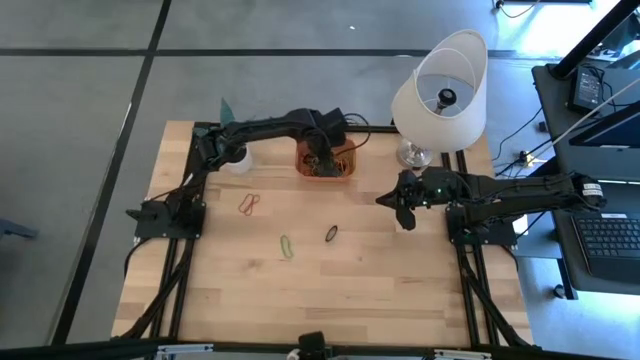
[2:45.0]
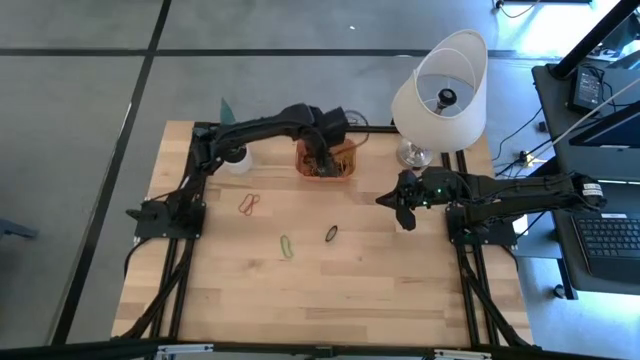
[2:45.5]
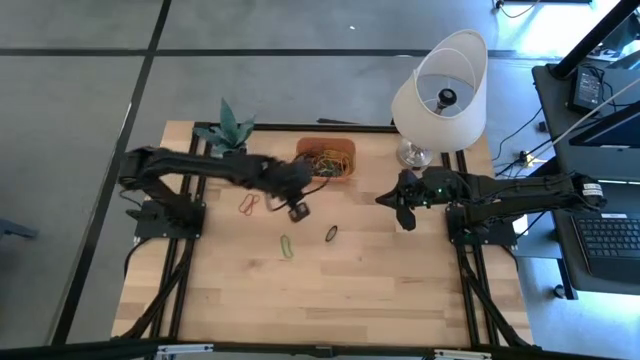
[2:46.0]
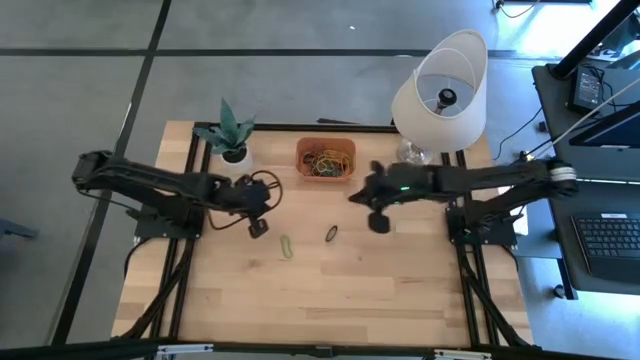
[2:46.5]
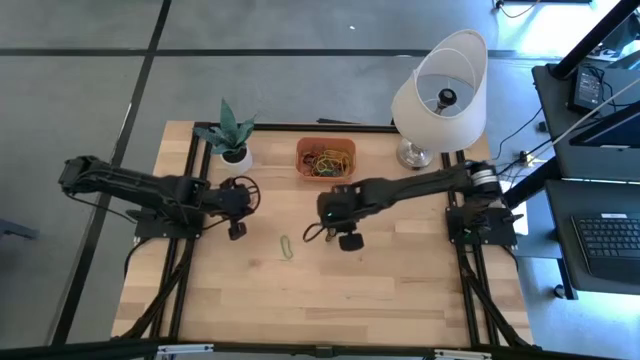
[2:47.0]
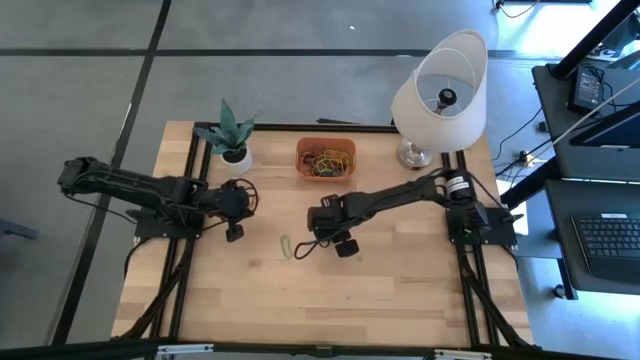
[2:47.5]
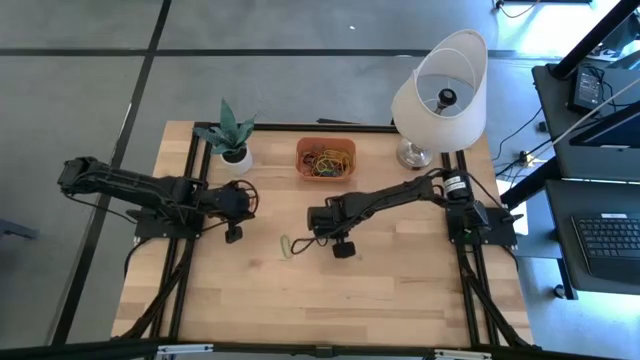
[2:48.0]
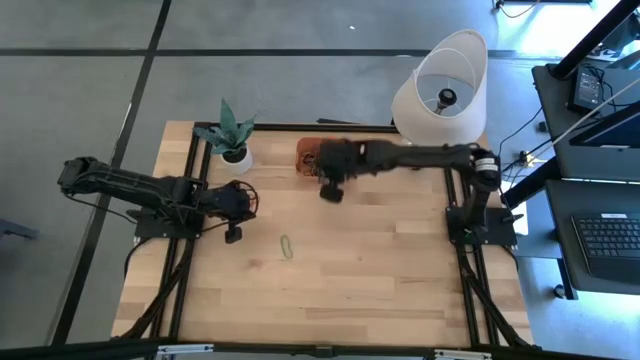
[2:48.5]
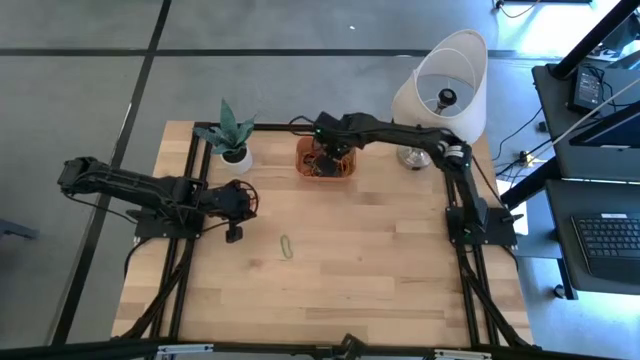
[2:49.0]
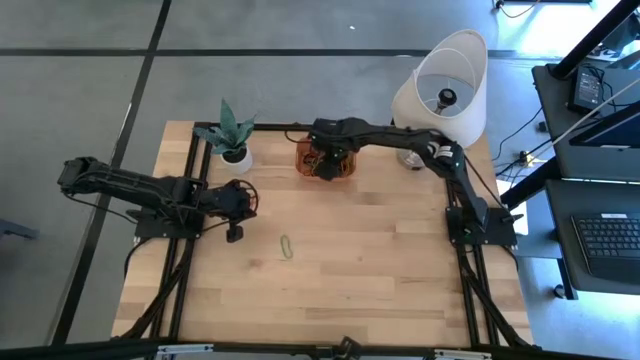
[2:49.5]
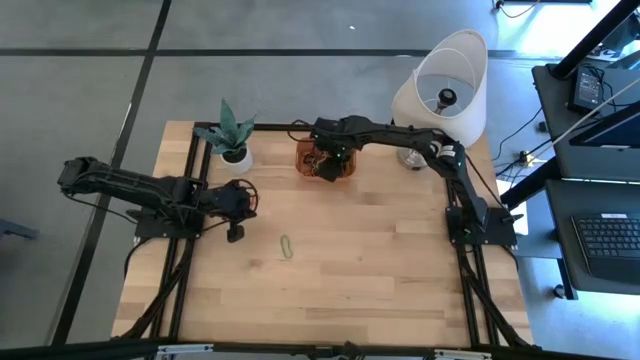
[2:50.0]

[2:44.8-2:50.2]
Task: Pick and place rubber bands into bin
Put the black rubber band into the orange bin

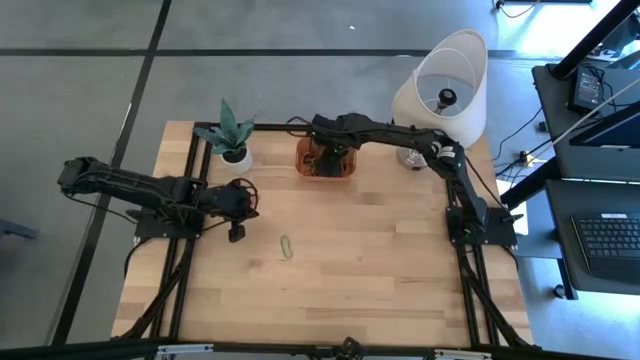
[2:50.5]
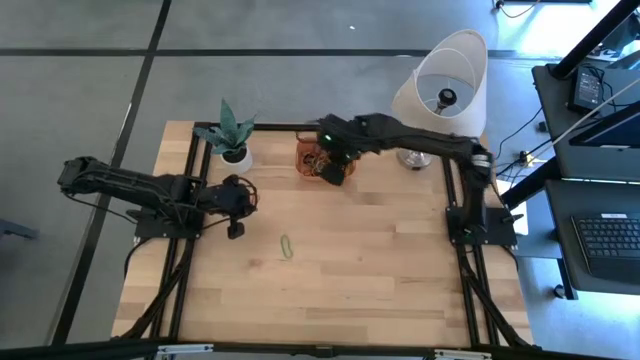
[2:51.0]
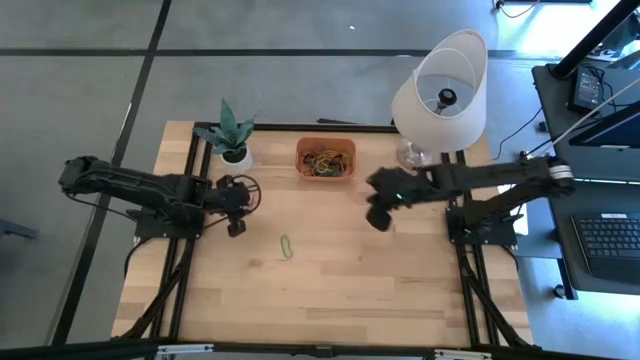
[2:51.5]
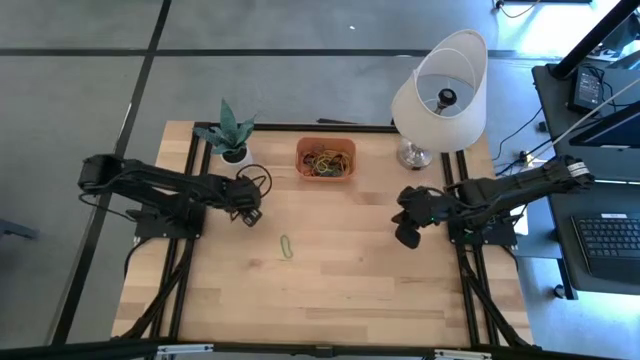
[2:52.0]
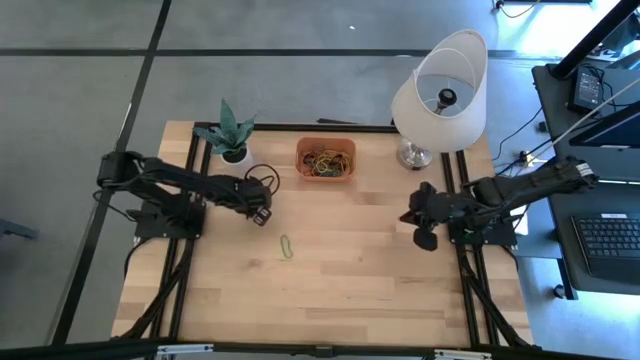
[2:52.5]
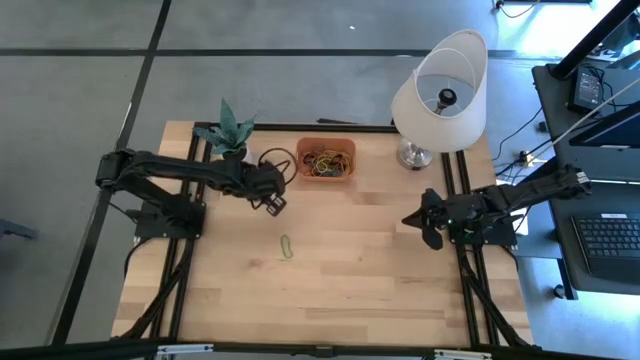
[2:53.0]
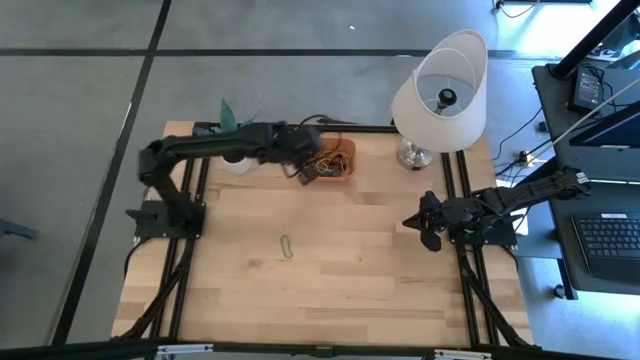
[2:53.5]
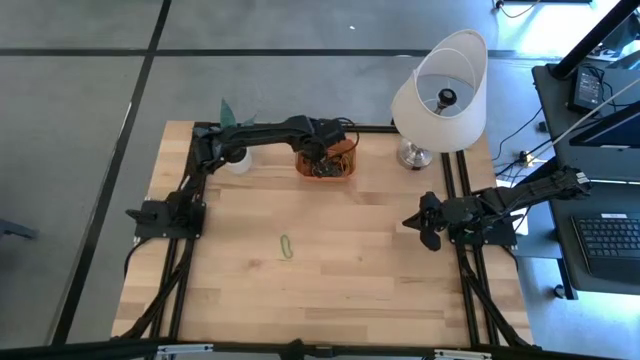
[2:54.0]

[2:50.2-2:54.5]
Put the red rubber band into the orange bin

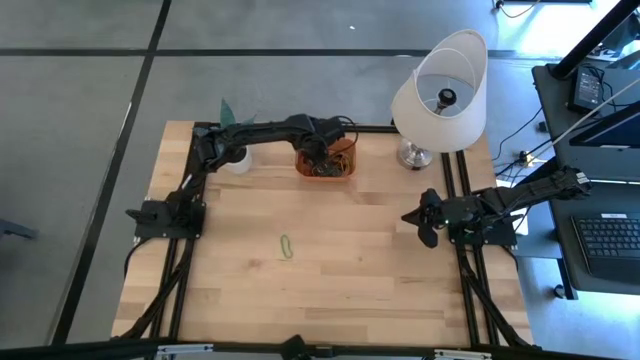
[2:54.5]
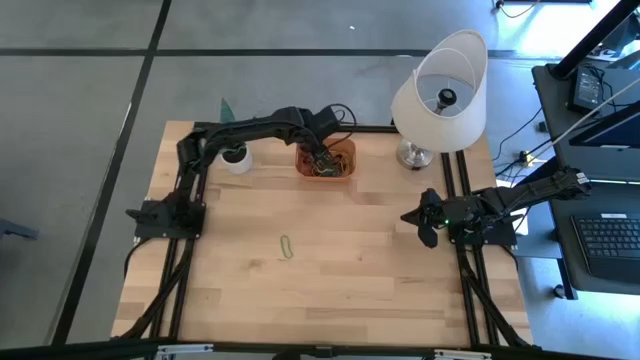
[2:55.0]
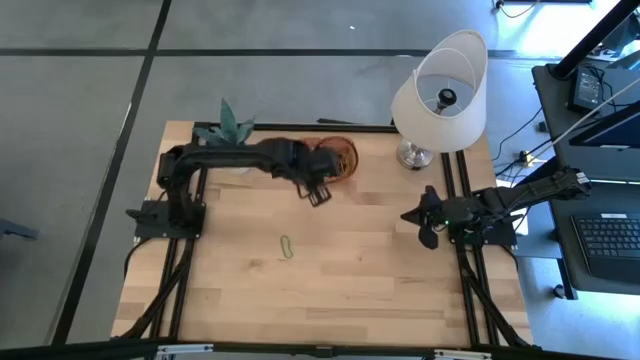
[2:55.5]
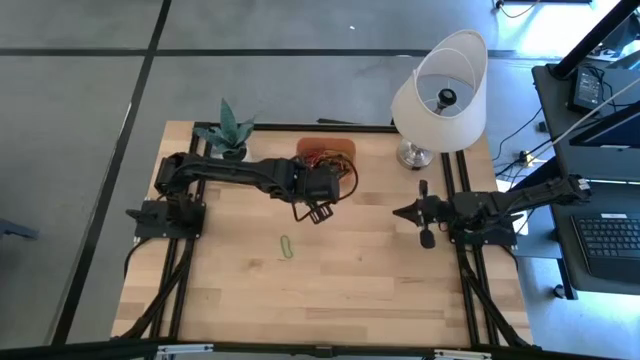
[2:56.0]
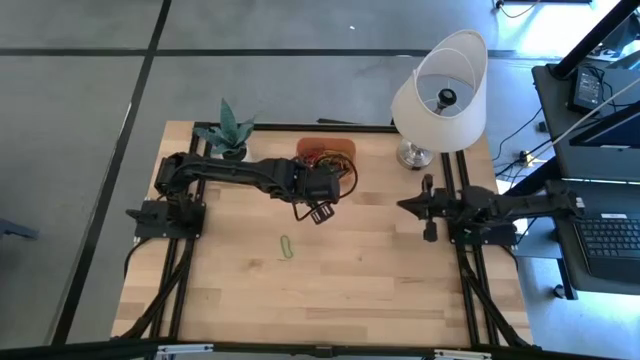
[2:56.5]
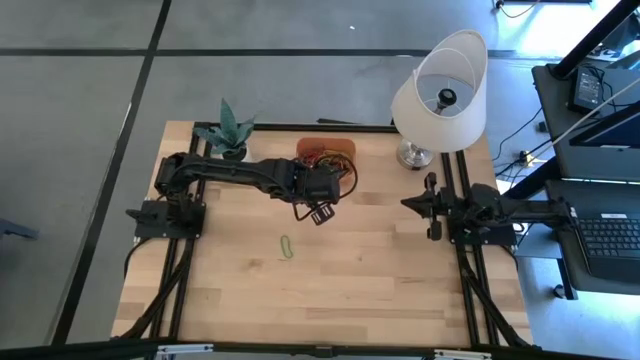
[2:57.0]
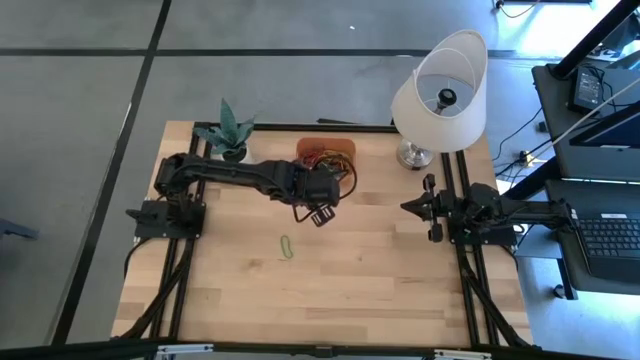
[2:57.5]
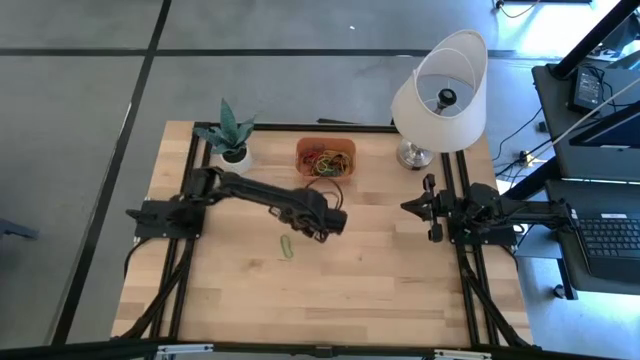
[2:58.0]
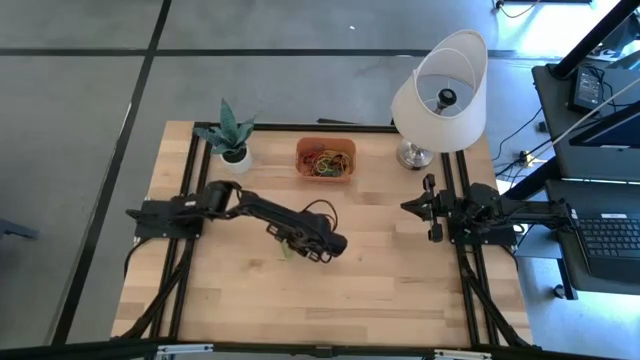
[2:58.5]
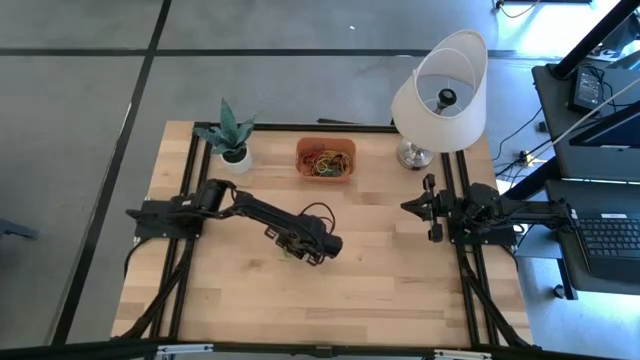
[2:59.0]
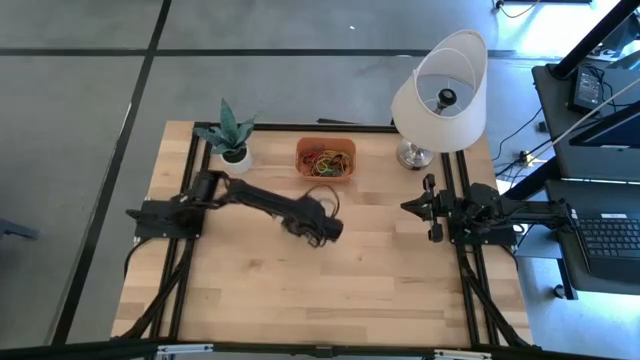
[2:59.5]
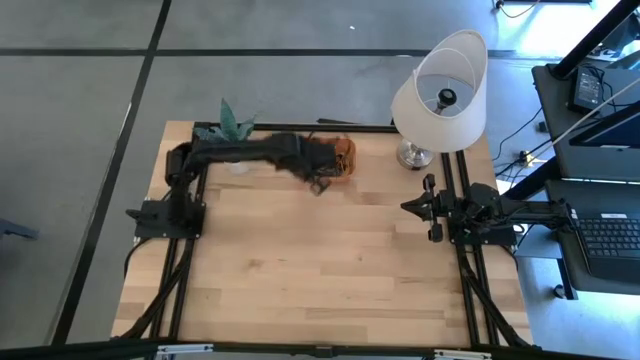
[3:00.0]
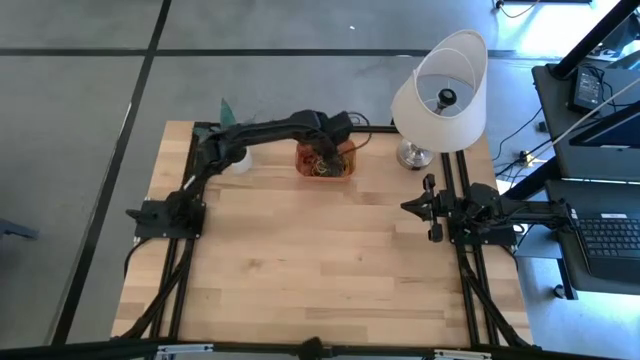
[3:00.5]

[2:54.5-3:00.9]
Put the green rubber band into the orange bin

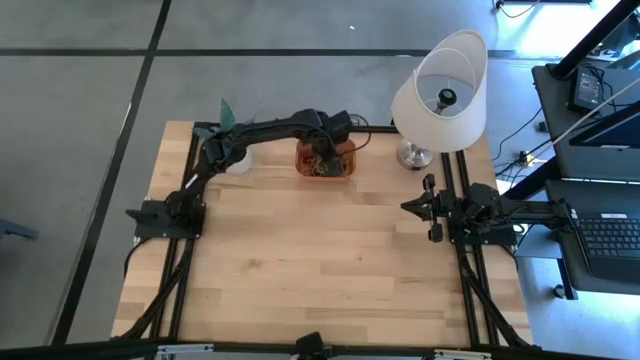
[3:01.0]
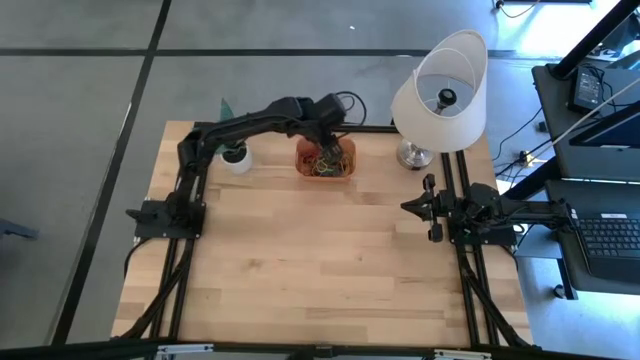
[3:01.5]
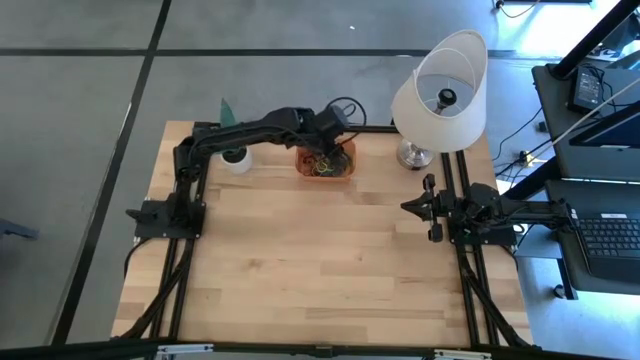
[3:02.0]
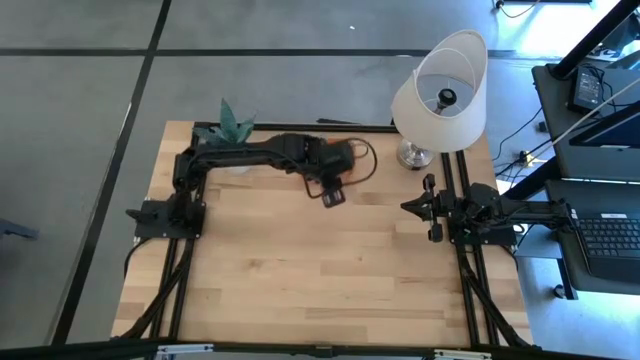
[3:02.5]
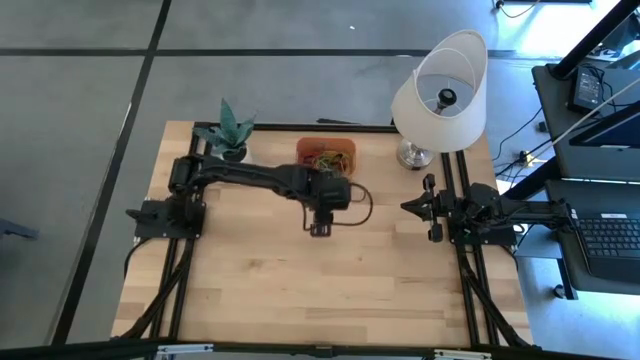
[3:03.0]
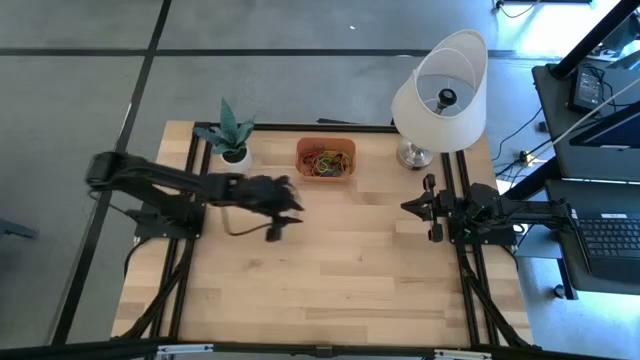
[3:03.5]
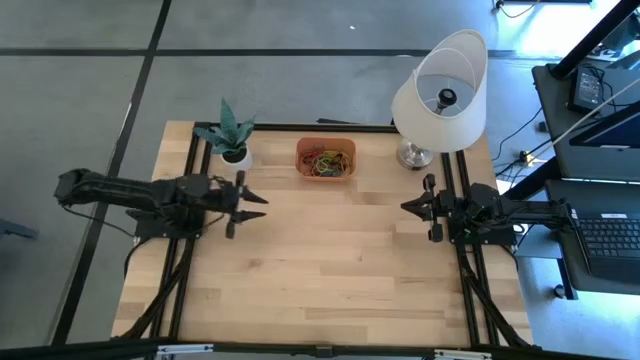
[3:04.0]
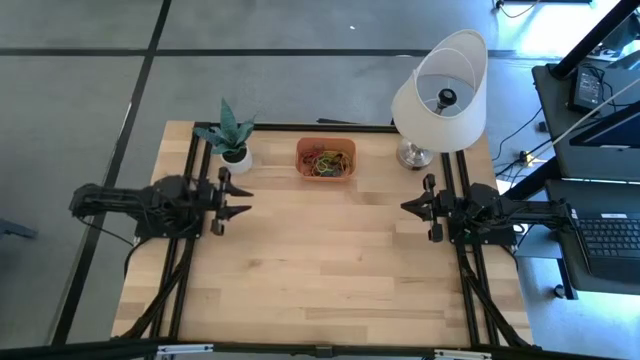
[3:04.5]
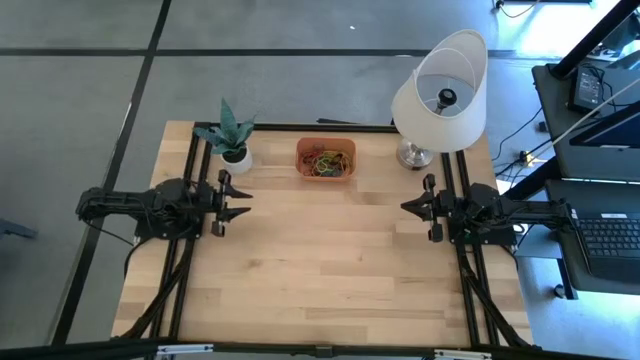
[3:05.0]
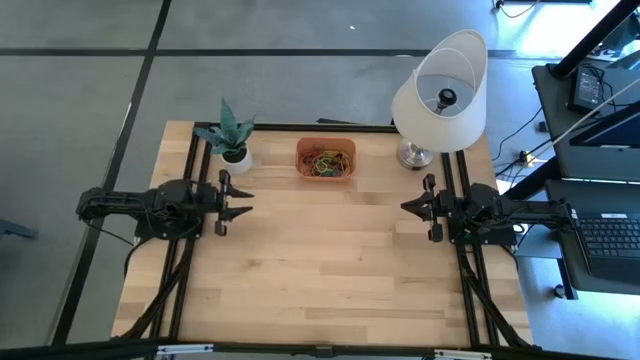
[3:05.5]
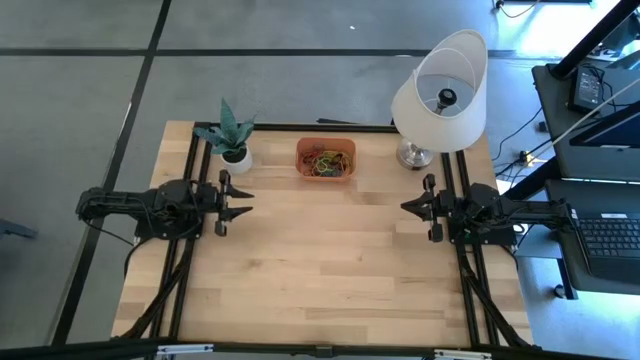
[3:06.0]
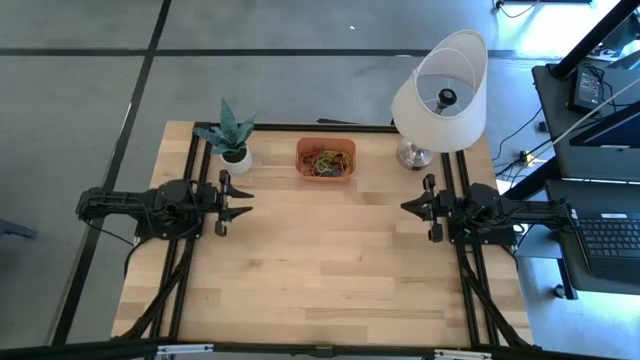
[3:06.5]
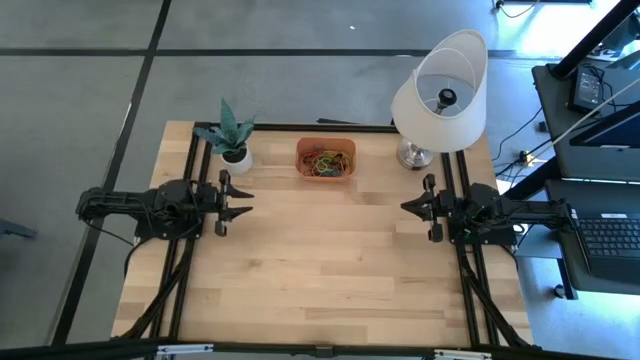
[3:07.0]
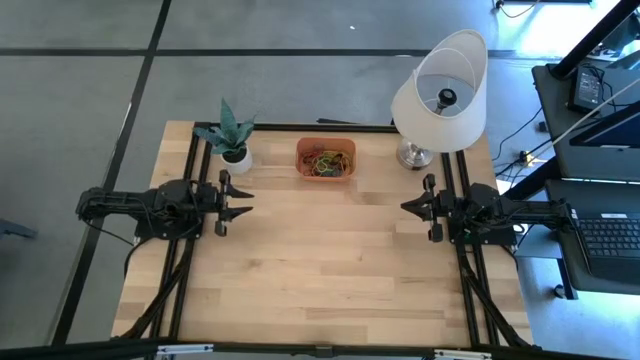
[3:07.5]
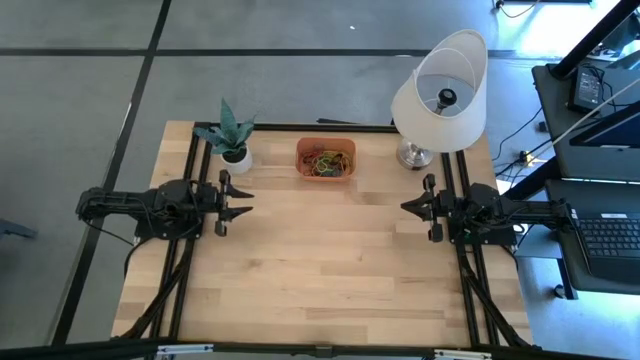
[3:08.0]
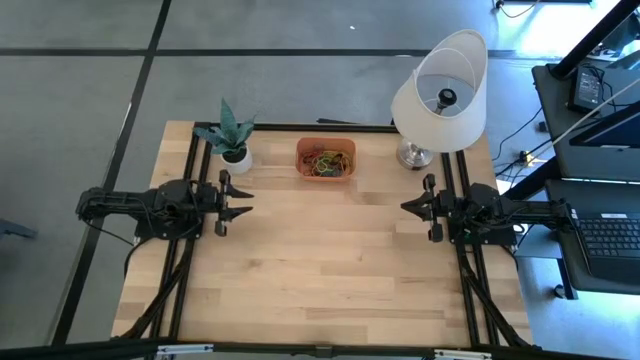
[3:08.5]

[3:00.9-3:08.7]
Return to Home Position
